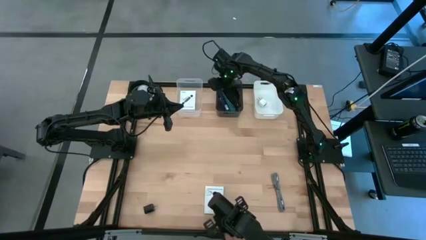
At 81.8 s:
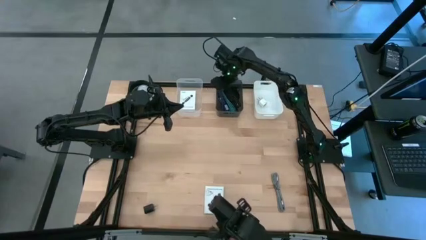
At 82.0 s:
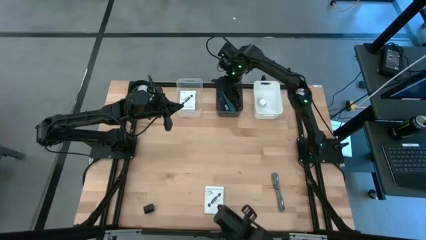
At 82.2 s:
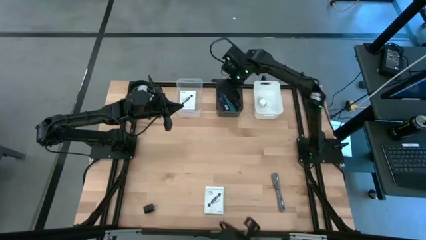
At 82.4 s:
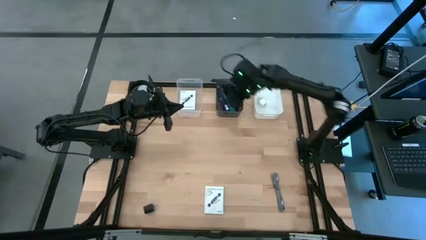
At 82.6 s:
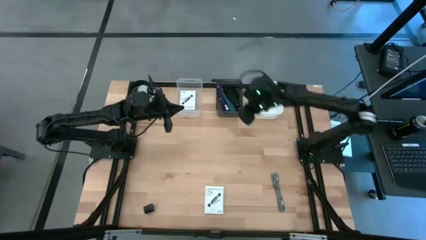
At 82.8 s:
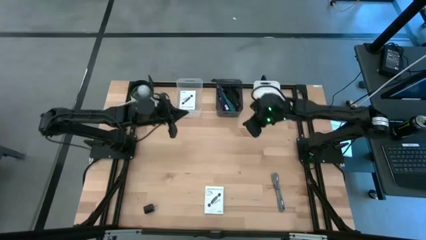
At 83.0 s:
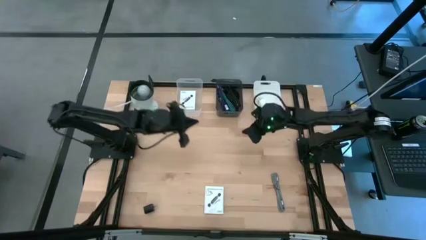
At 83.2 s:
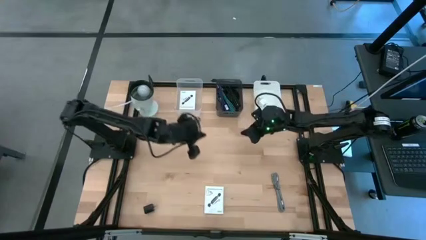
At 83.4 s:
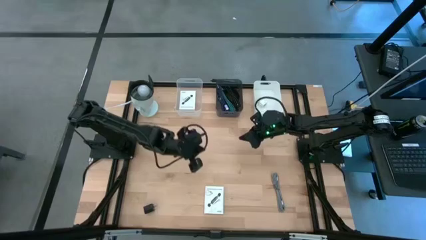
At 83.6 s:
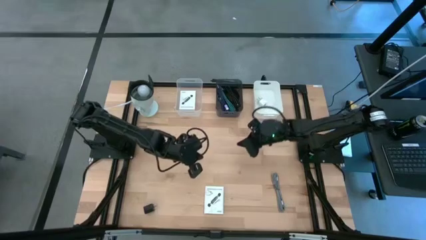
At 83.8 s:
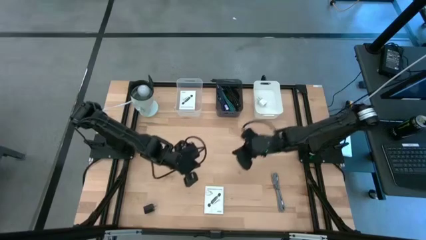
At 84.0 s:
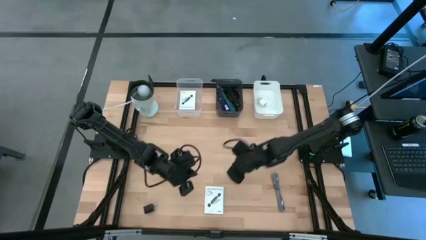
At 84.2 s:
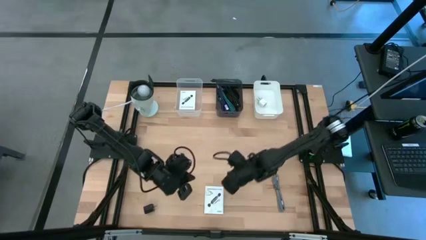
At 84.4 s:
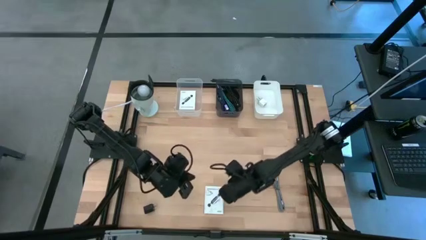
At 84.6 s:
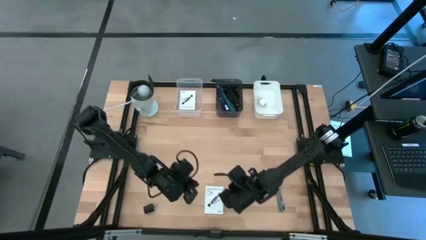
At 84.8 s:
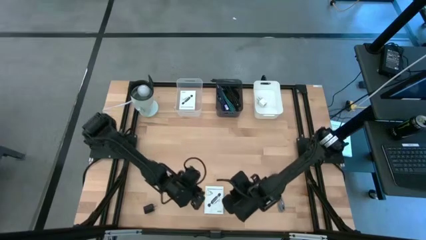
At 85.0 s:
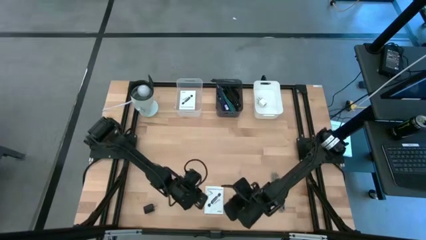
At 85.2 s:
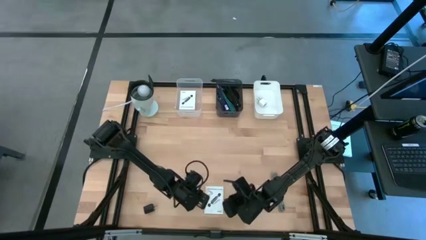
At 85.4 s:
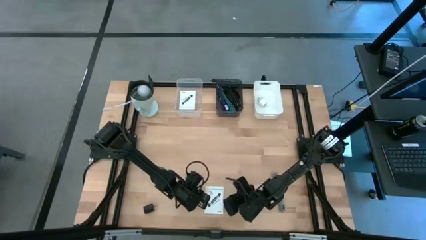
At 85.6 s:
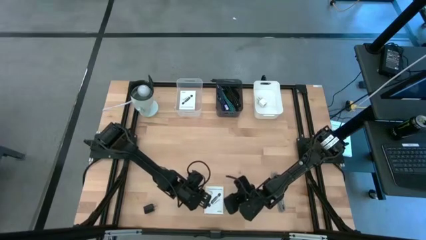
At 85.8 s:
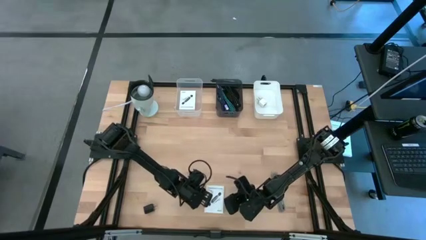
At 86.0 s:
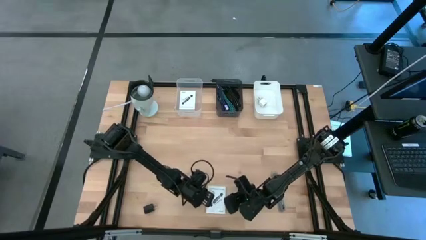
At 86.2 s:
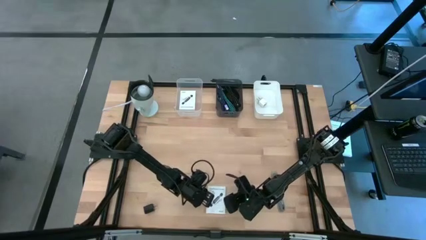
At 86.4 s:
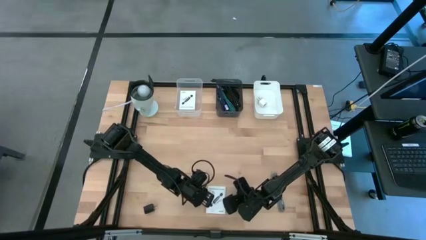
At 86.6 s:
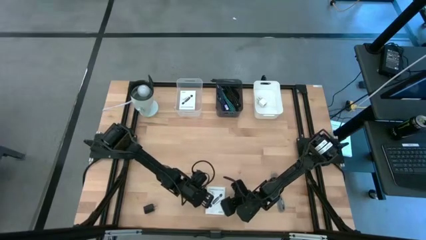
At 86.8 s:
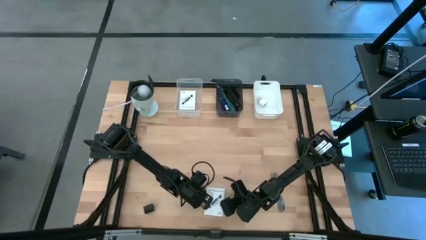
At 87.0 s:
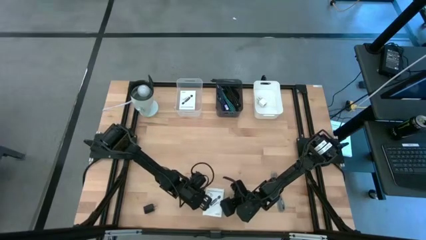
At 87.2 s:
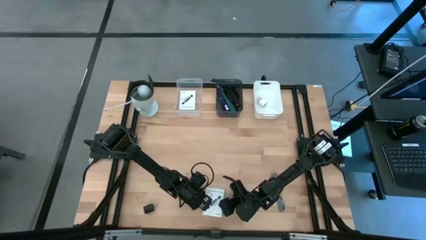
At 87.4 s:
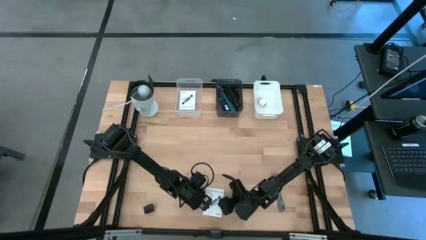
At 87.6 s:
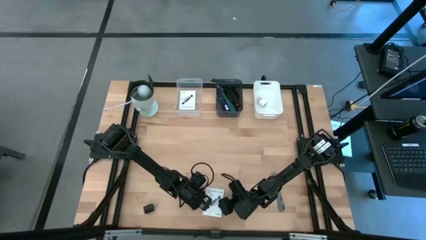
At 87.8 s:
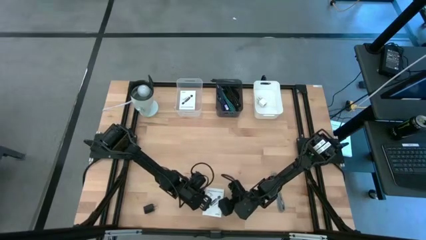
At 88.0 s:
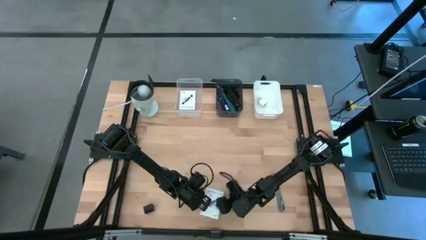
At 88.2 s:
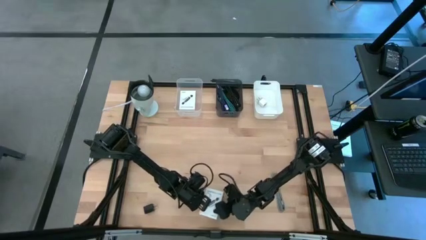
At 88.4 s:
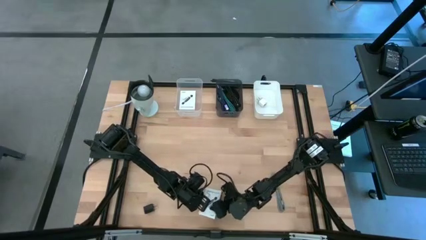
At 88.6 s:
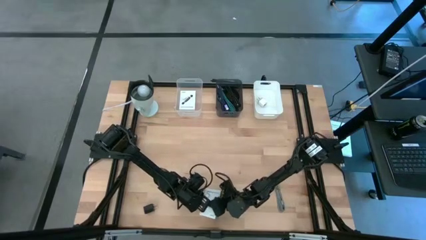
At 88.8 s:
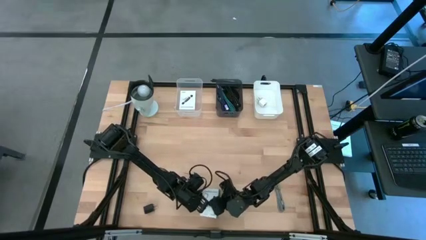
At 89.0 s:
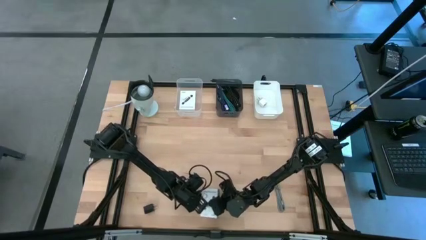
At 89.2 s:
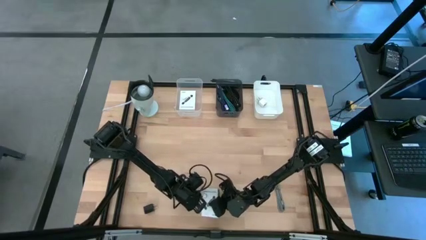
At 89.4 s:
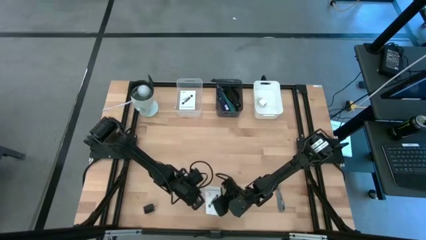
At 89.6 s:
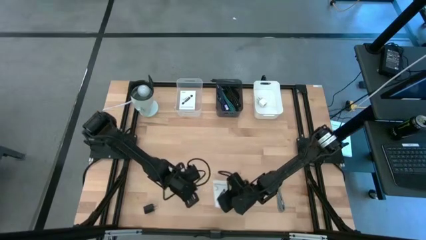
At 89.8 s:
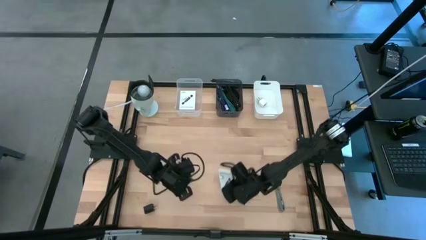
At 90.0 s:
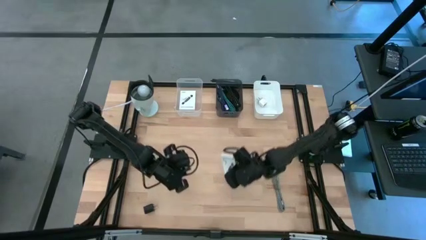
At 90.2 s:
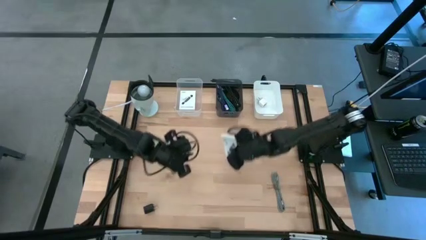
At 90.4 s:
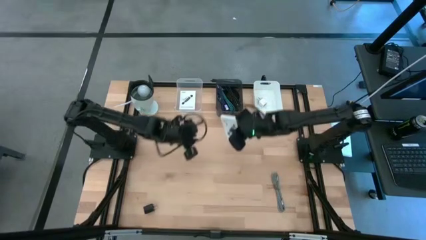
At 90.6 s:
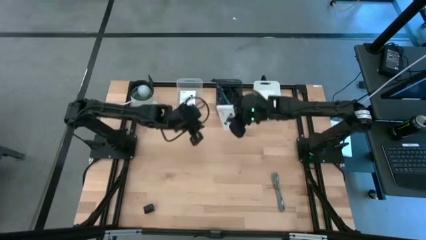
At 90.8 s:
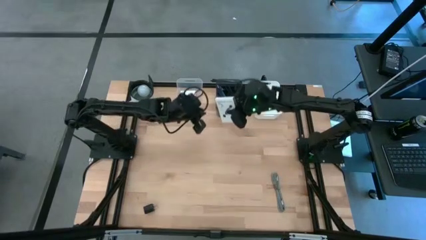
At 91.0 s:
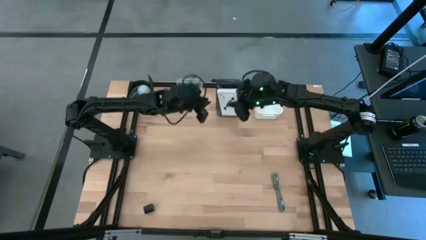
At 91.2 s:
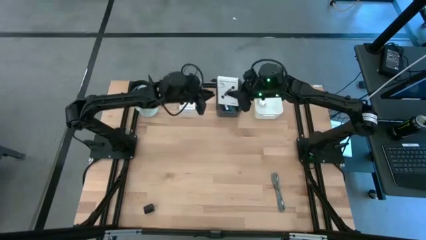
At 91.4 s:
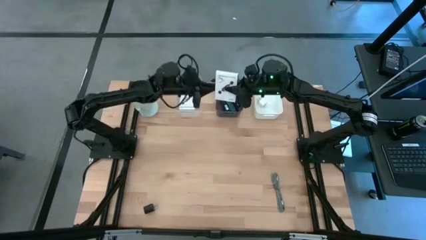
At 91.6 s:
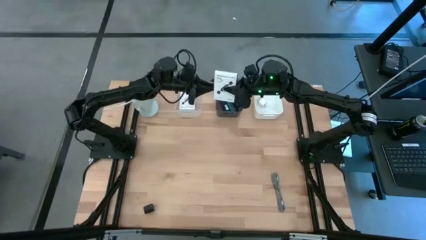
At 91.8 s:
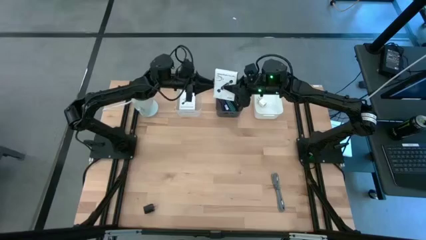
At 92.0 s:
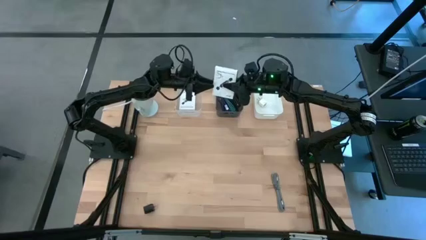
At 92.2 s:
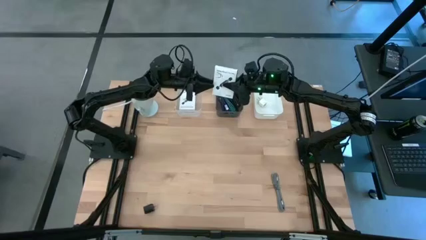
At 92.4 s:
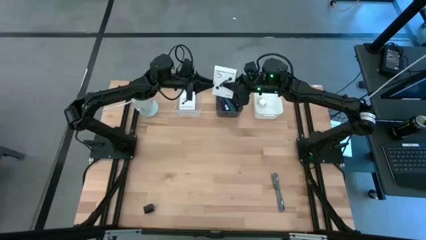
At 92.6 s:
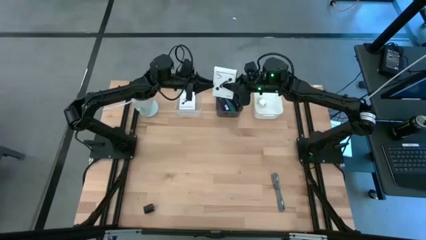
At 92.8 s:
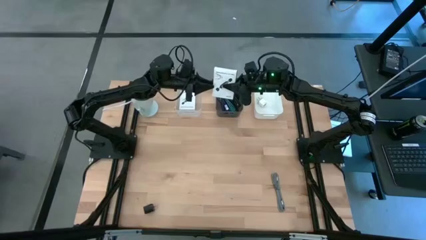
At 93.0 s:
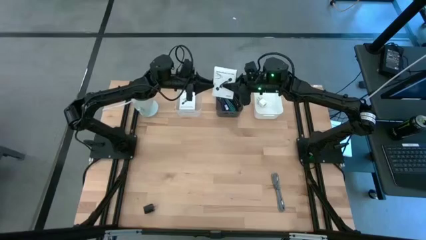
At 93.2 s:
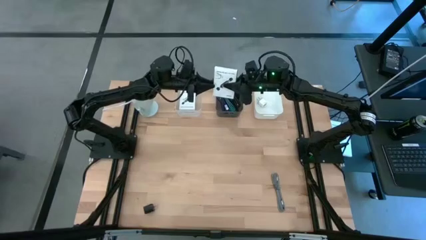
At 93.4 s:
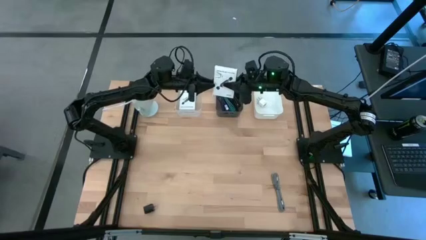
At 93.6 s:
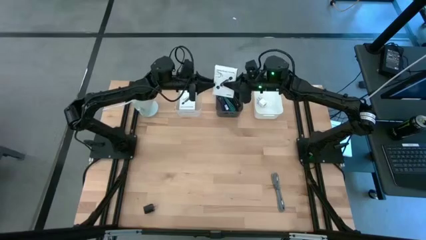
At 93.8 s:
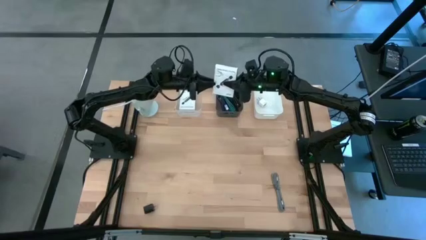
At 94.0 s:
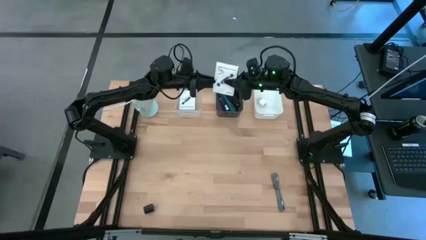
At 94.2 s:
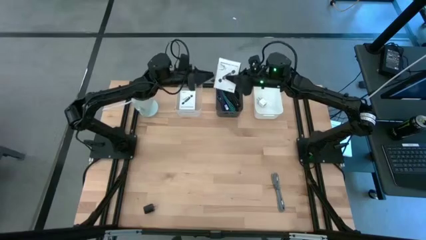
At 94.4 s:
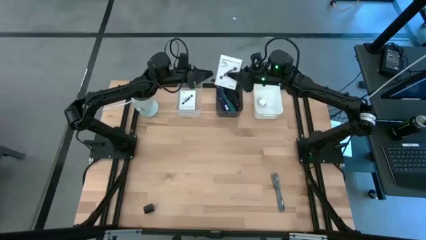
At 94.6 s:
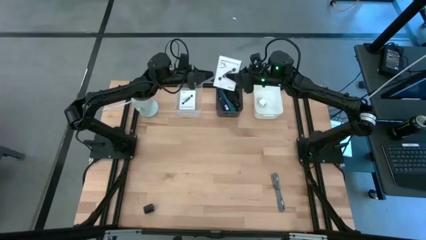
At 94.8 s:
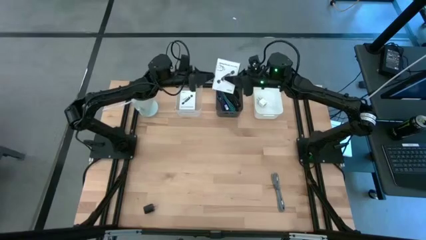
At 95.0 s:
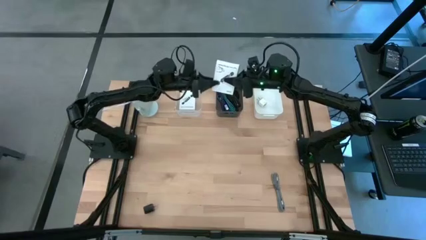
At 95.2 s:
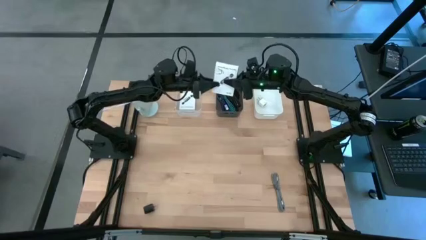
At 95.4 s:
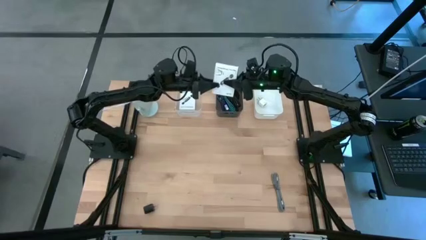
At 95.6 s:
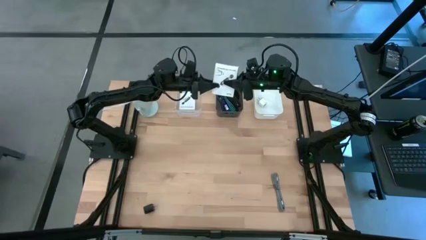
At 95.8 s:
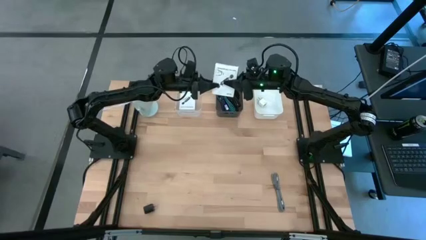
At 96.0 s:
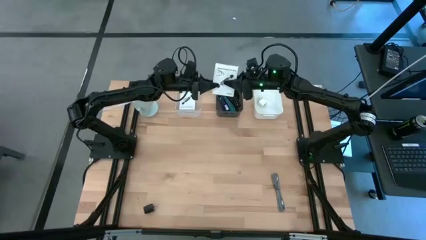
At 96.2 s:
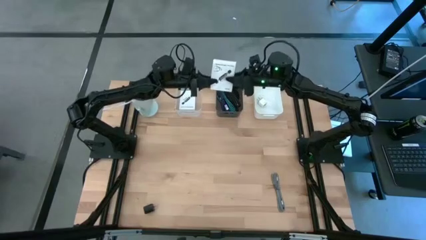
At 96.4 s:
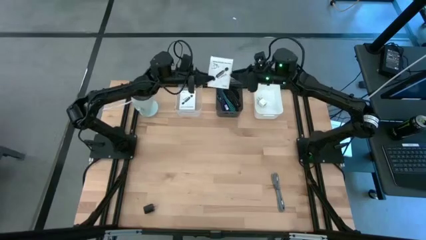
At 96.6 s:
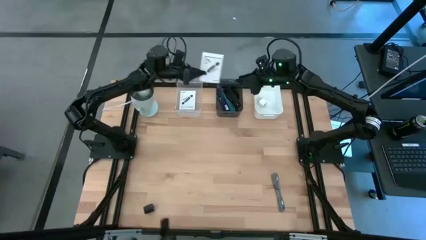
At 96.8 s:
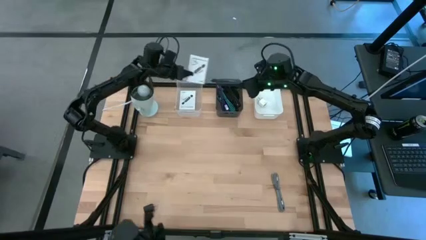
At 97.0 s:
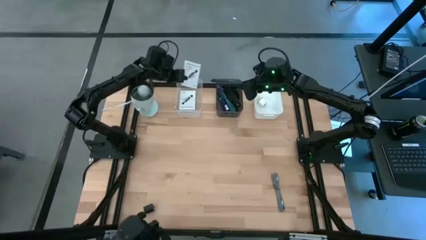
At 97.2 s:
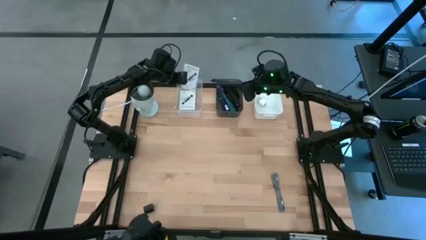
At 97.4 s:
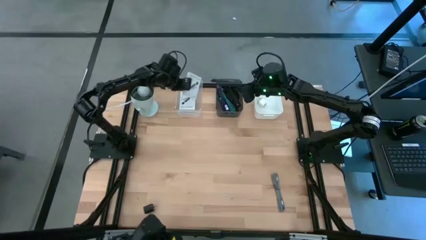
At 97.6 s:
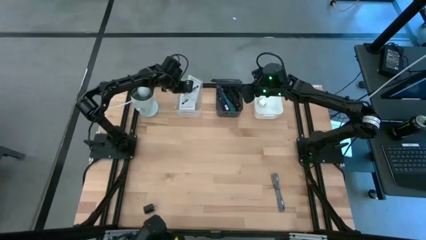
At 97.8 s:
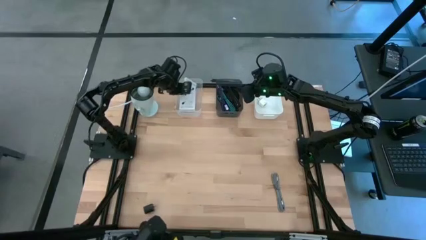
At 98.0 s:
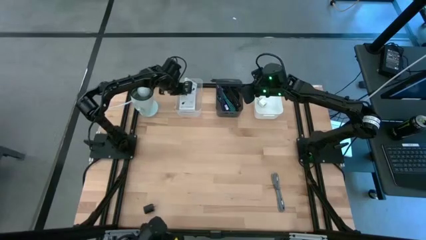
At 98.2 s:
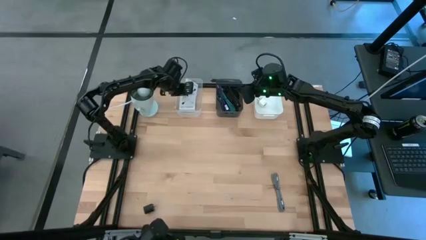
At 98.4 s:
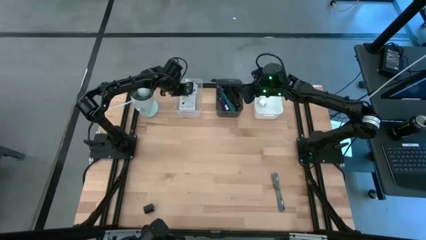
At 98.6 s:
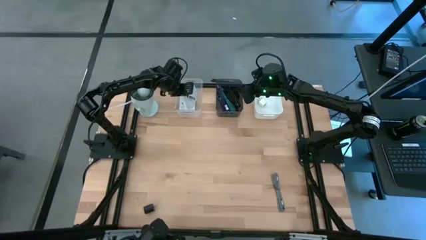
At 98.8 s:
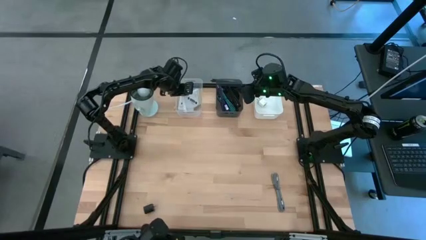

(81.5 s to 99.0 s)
Task: Pick and place items into bin
Put the SD card reader into the transparent bin
